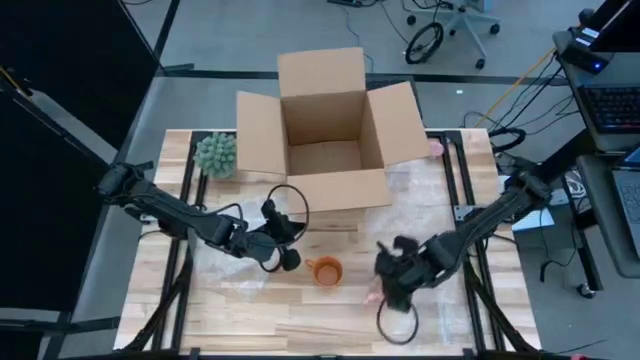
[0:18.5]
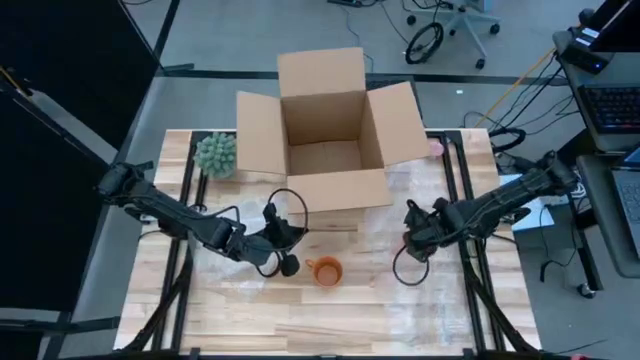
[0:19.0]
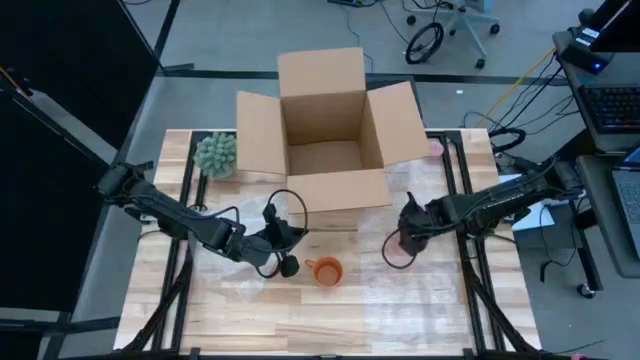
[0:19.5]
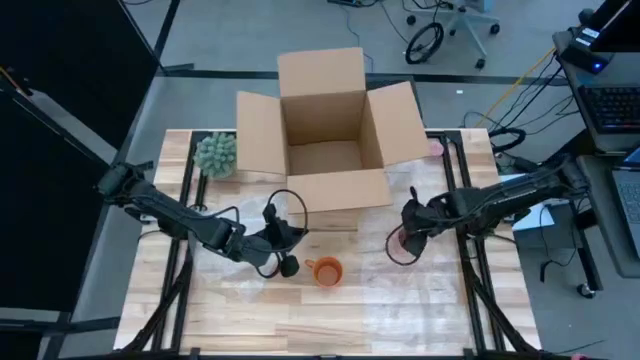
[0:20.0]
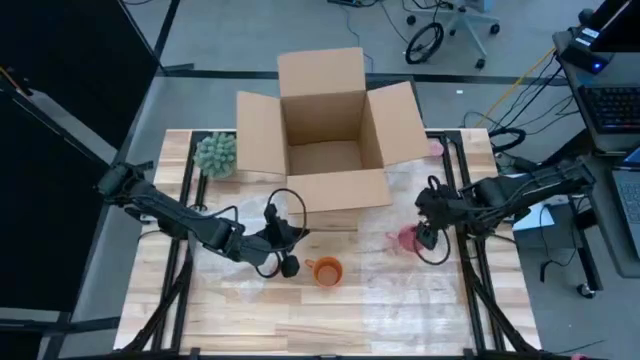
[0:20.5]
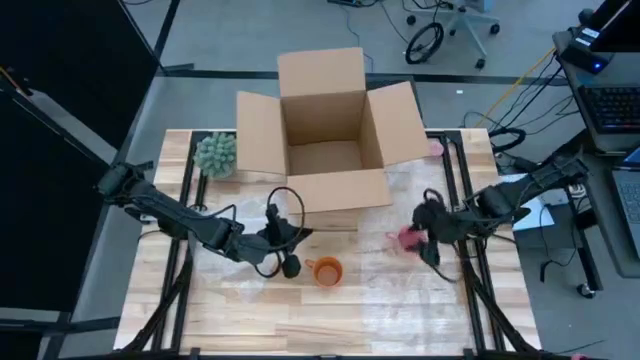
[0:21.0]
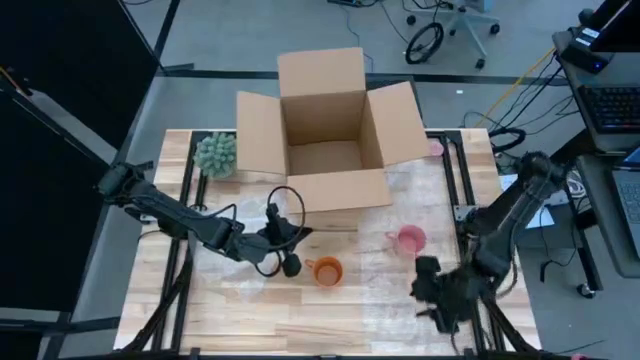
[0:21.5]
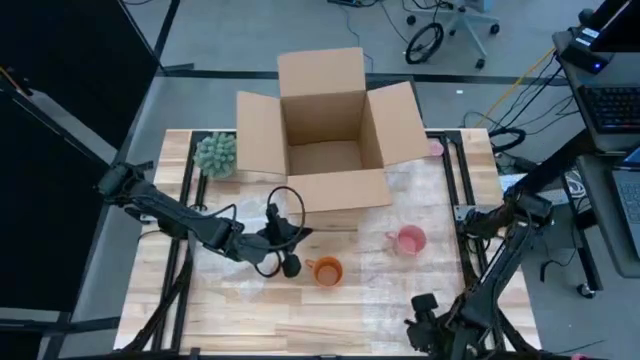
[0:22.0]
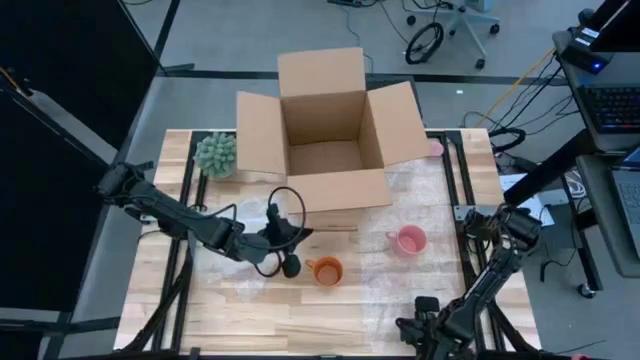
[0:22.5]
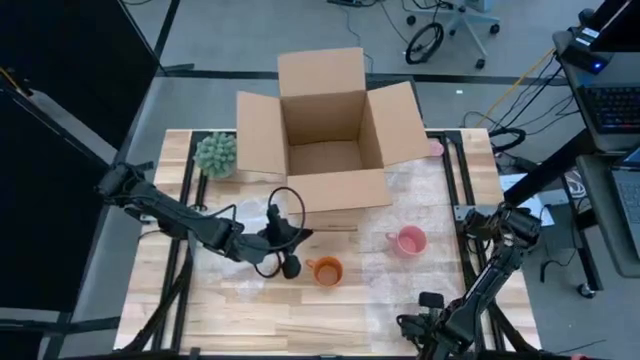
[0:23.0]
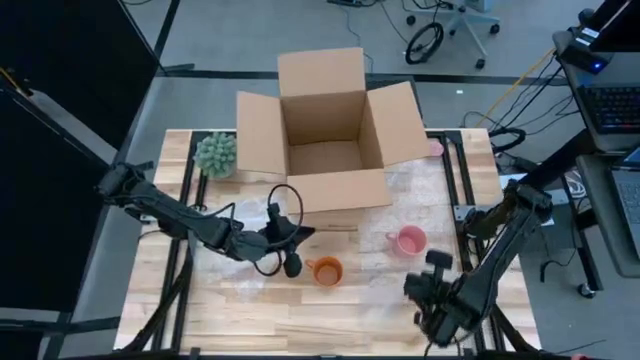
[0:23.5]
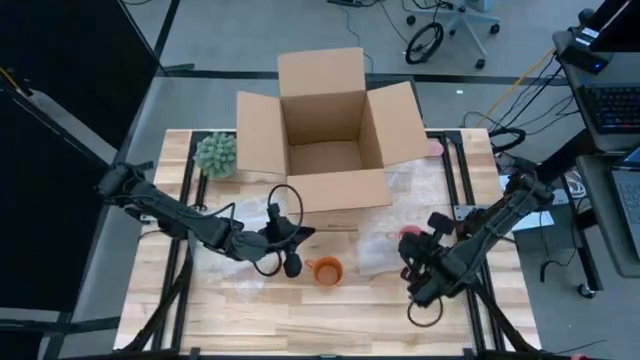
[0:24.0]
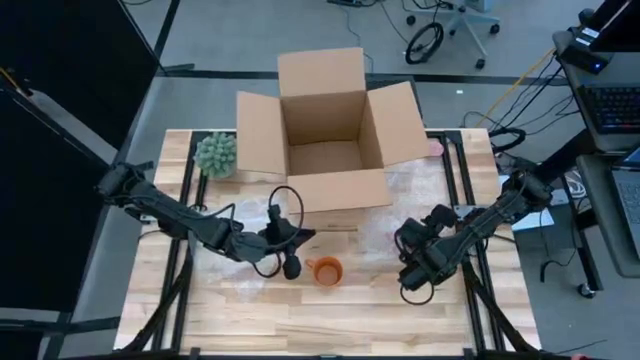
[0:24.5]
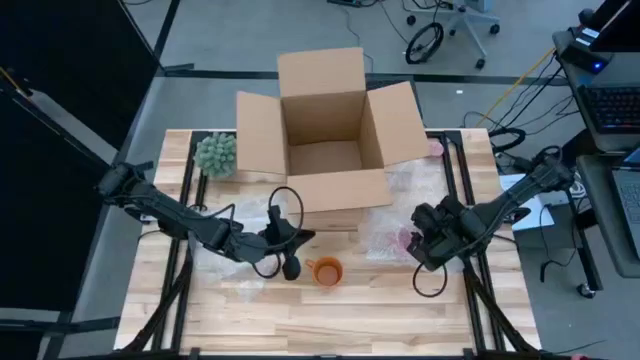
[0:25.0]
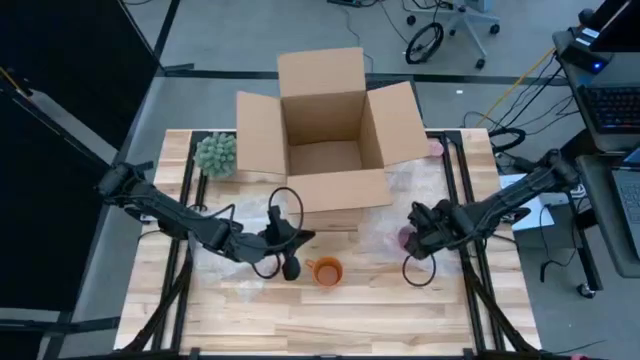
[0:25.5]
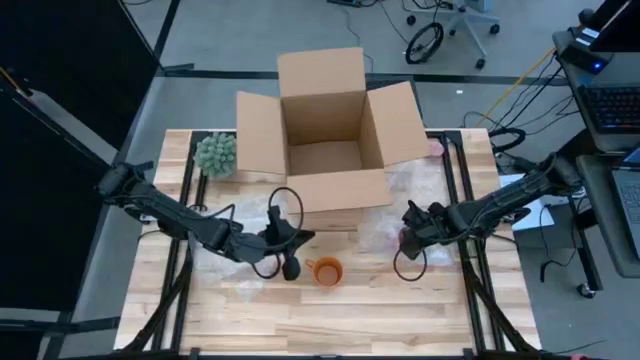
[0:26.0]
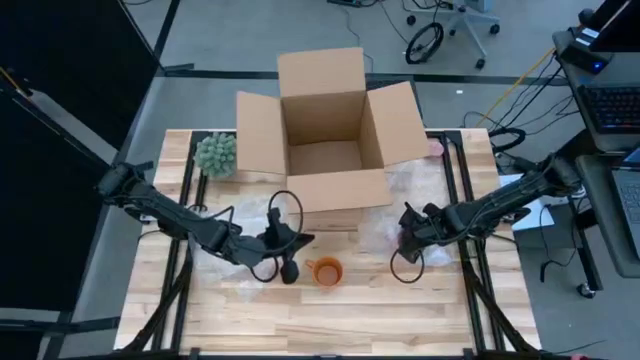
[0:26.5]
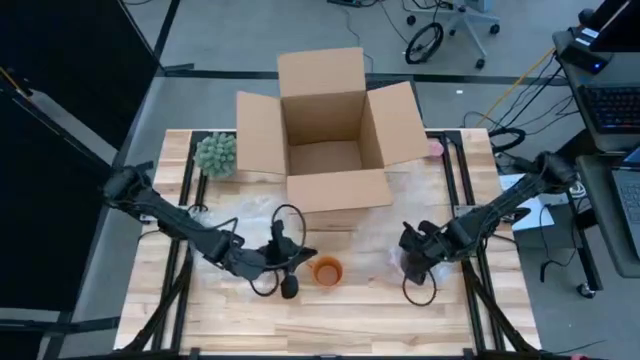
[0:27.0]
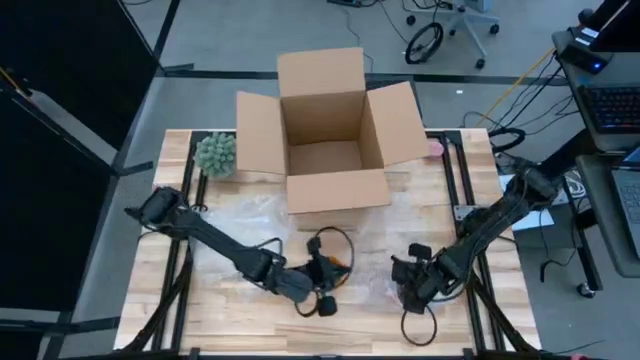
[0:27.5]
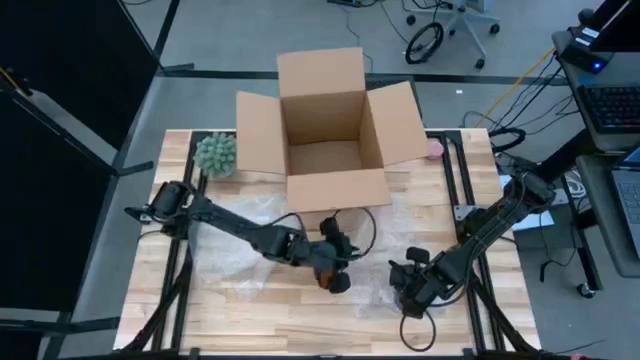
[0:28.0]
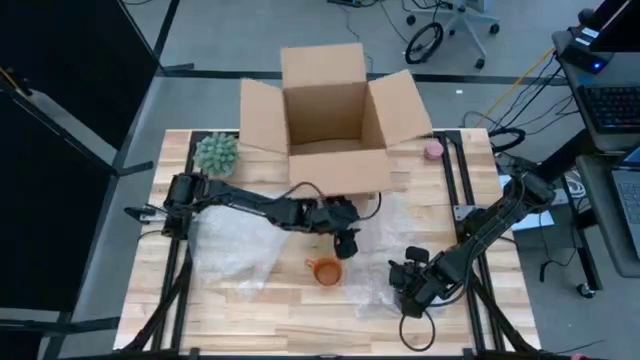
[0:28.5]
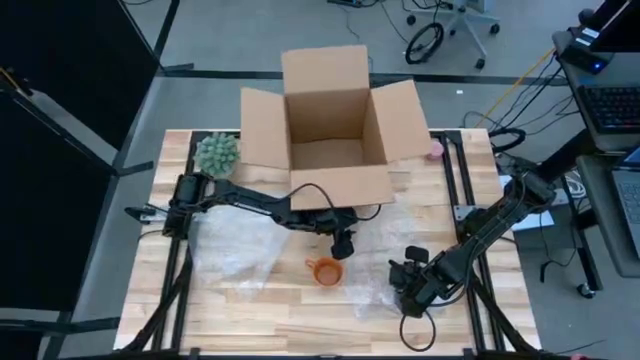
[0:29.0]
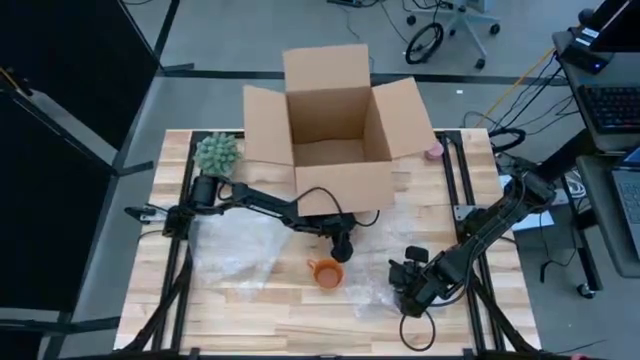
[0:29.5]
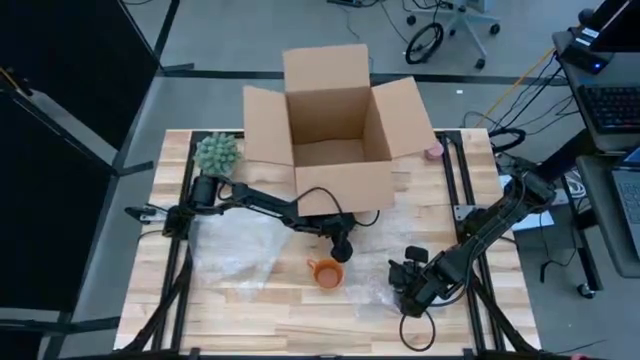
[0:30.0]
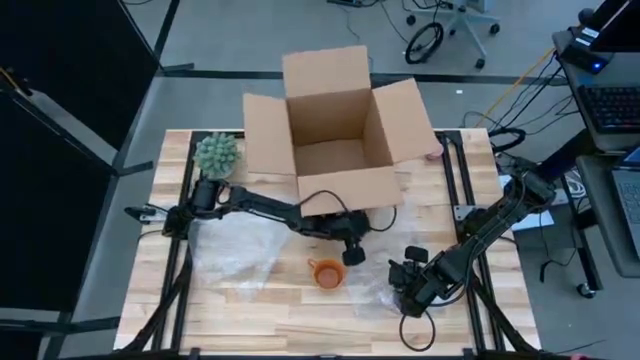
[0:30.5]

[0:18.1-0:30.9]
Task: wrap mug
Wrap the pink mug with the right bubble wrap

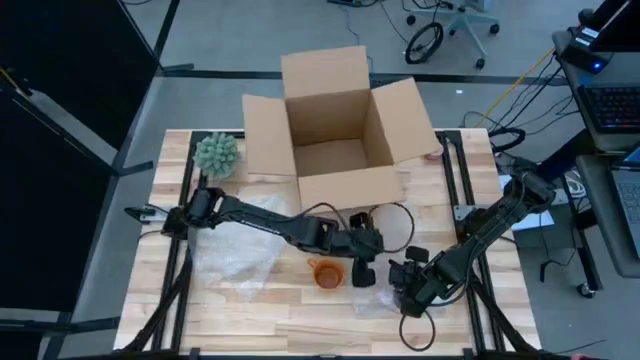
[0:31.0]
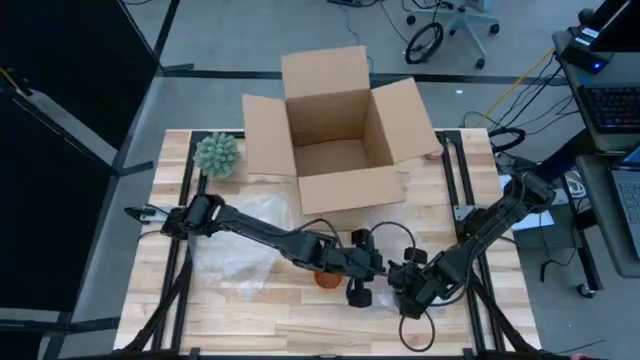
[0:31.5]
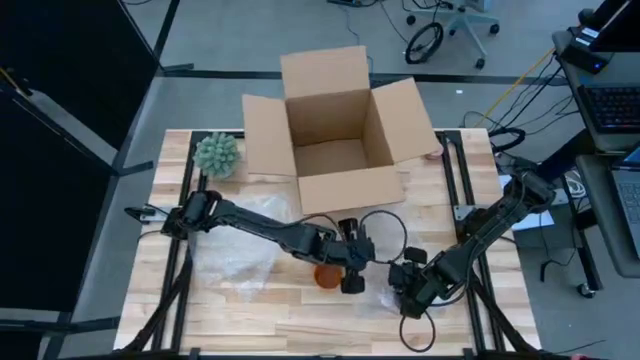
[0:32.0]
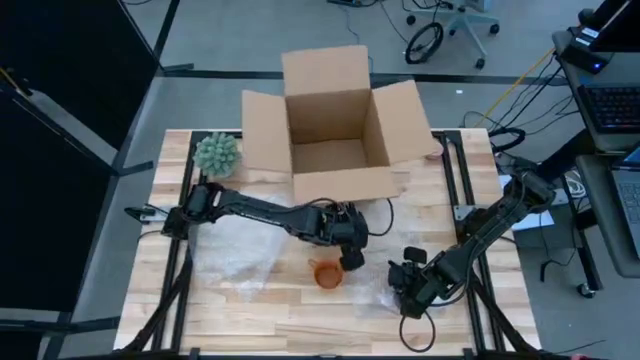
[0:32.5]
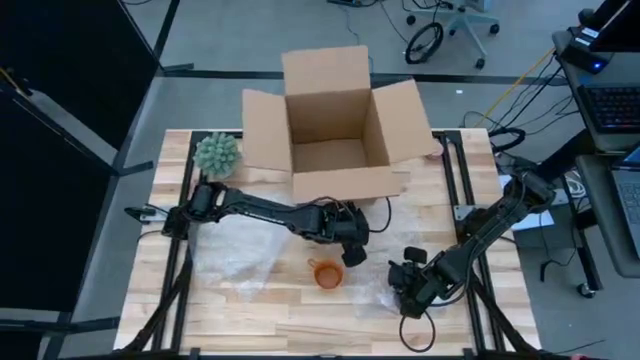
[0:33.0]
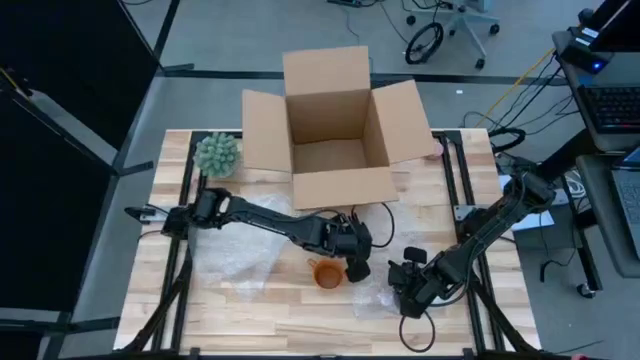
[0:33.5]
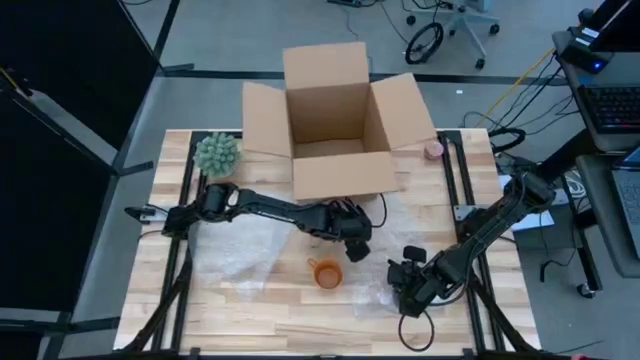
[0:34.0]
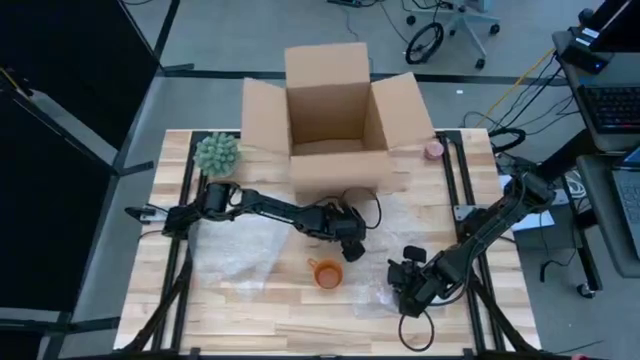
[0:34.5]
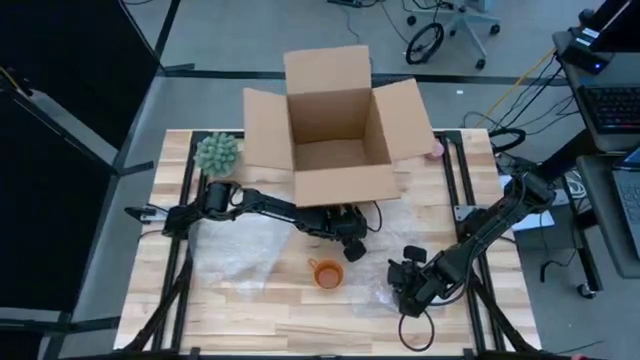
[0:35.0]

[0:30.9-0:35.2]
Wrap the pink mug with the right bubble wrap

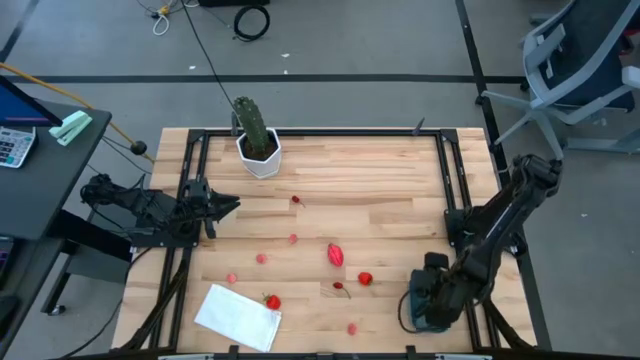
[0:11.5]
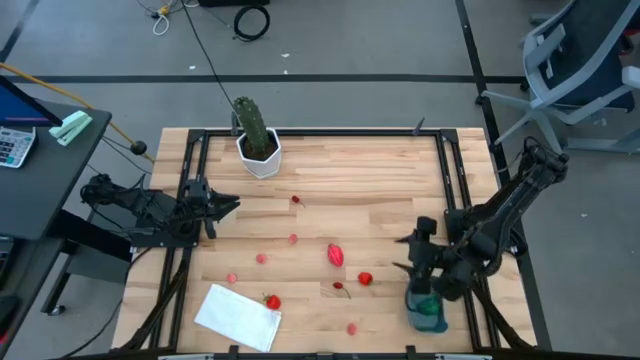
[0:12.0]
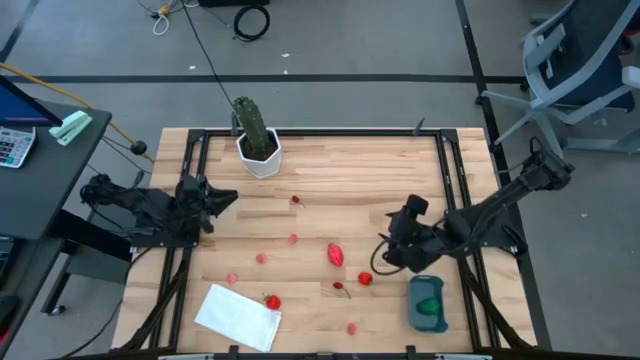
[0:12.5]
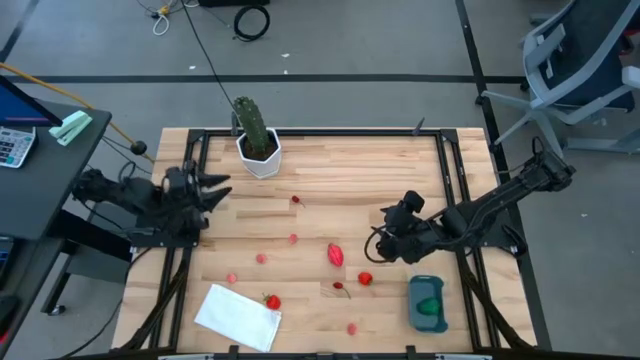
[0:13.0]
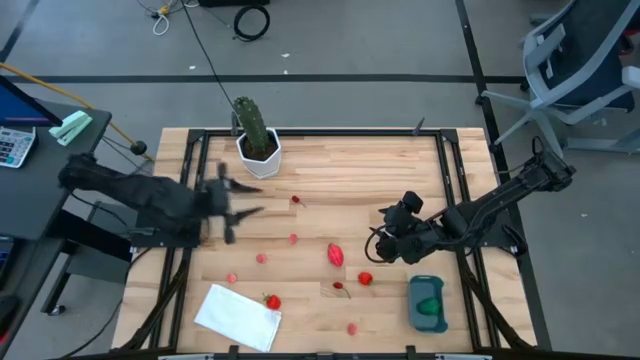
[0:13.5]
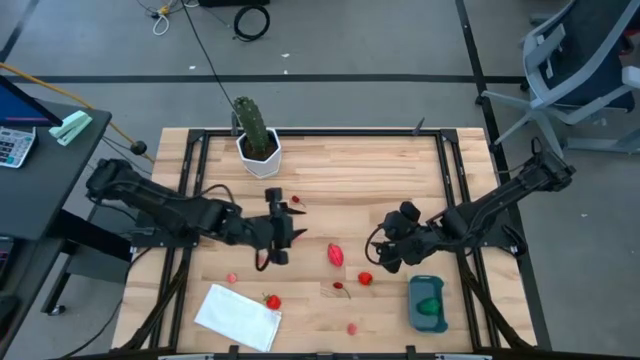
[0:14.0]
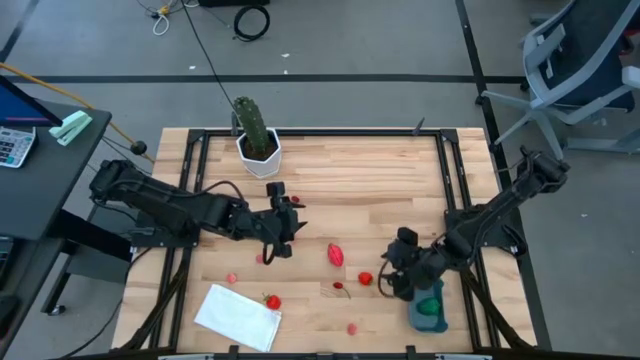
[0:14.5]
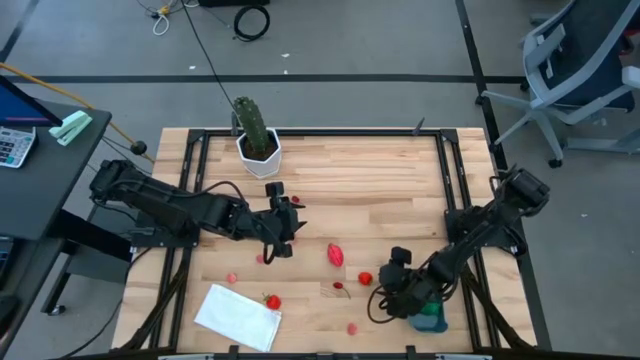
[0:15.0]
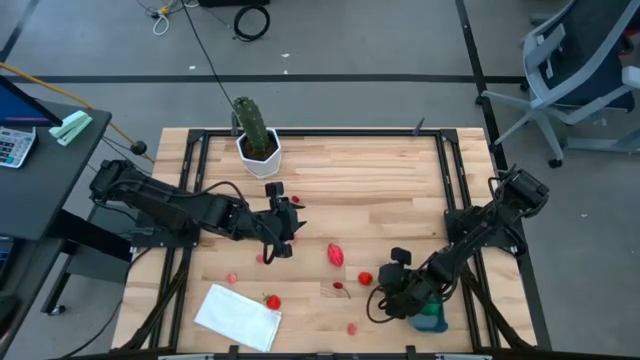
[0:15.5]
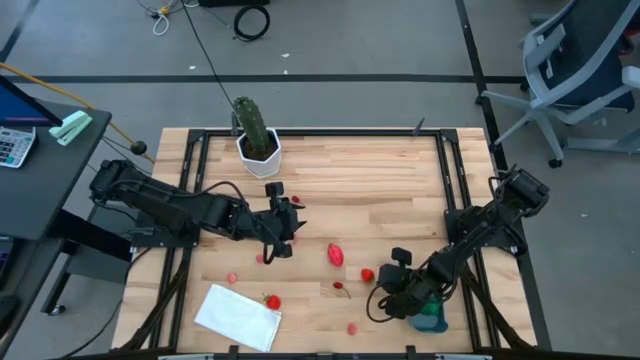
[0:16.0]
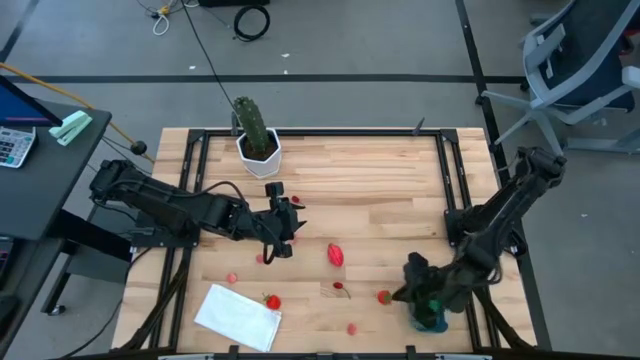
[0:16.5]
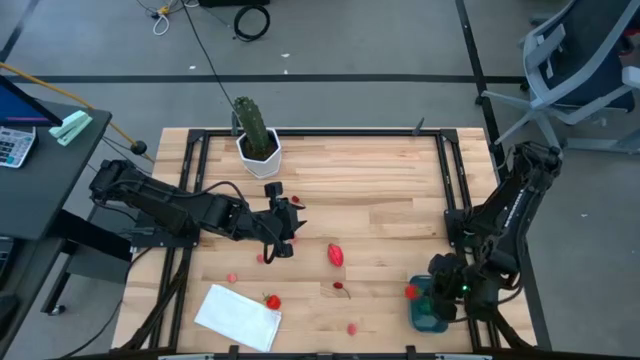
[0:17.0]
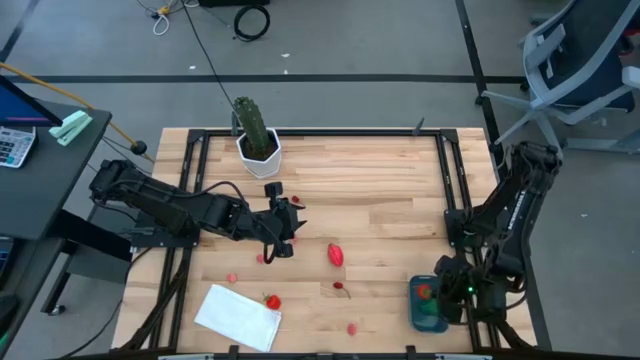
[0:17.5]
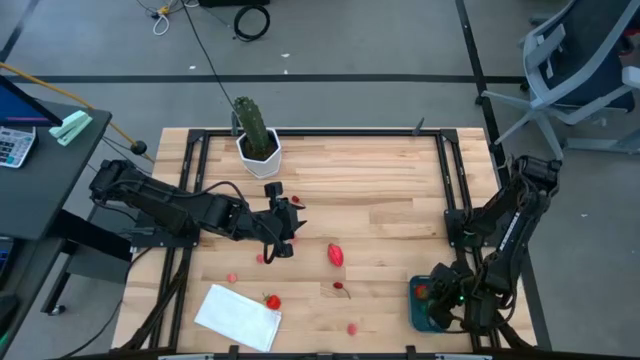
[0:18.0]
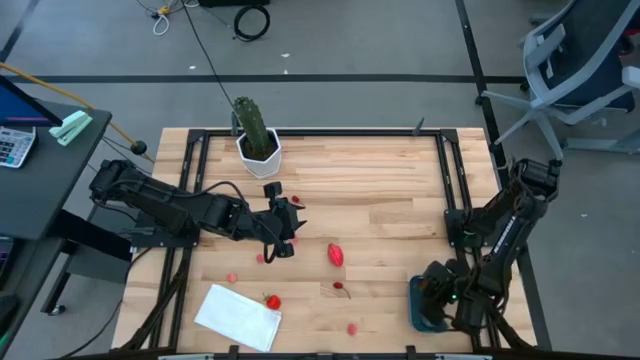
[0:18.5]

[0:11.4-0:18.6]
Task: Pick and placing Produce into tupperware
Put the red strawberry into the bin
